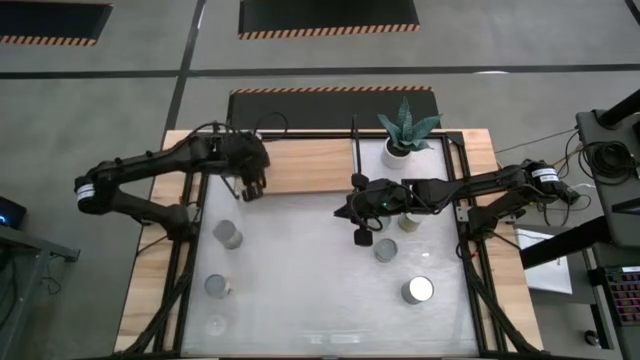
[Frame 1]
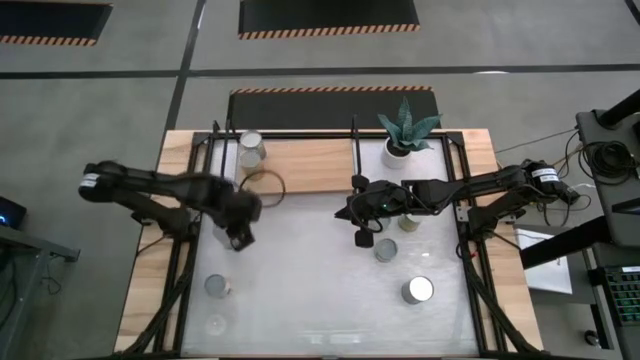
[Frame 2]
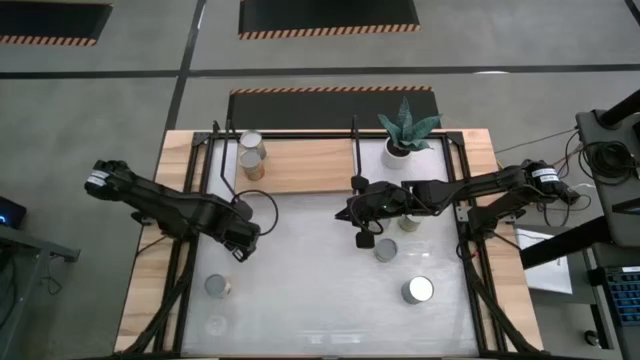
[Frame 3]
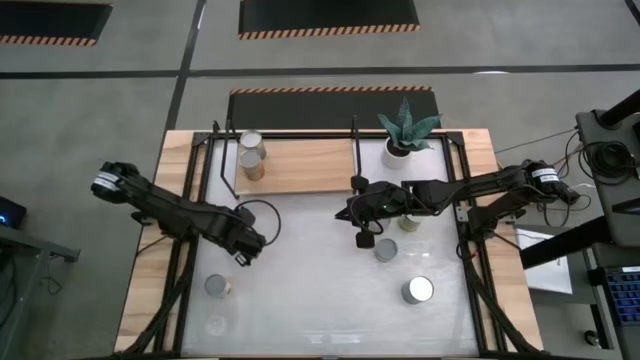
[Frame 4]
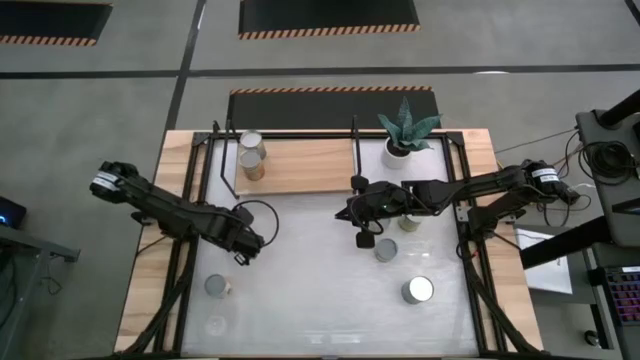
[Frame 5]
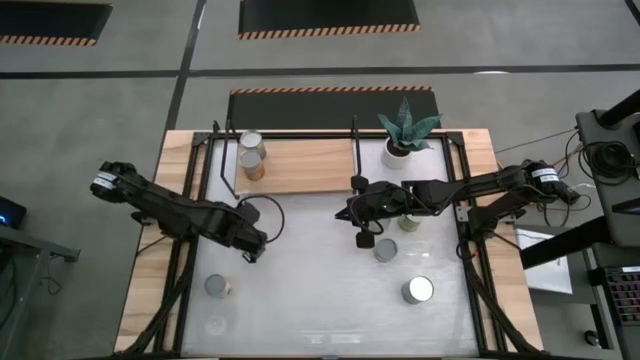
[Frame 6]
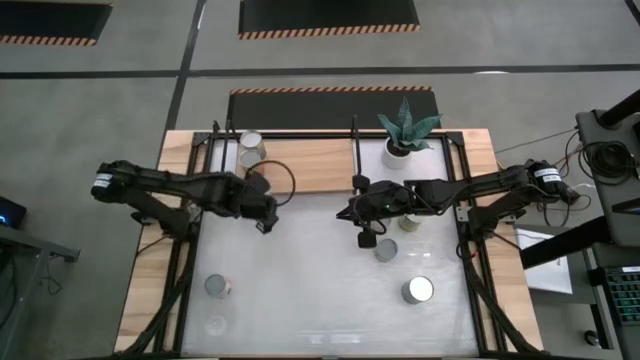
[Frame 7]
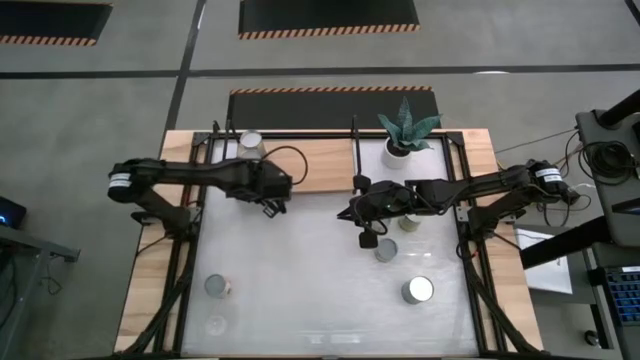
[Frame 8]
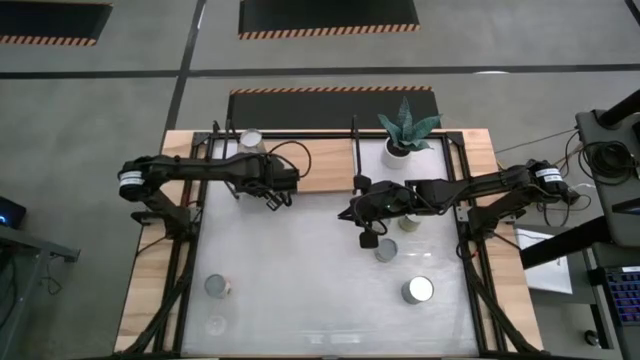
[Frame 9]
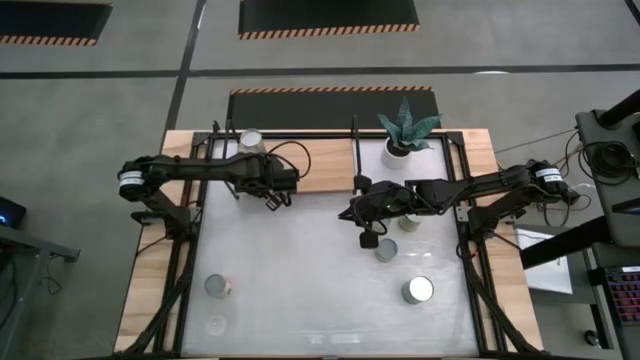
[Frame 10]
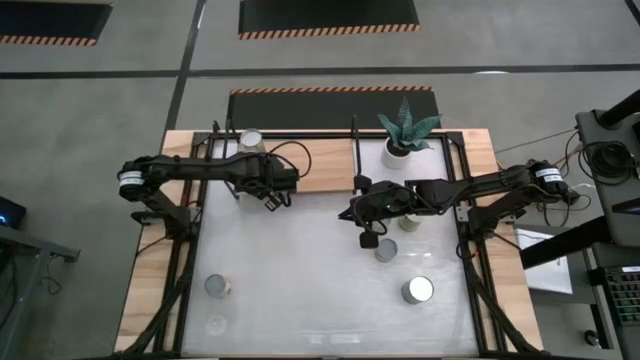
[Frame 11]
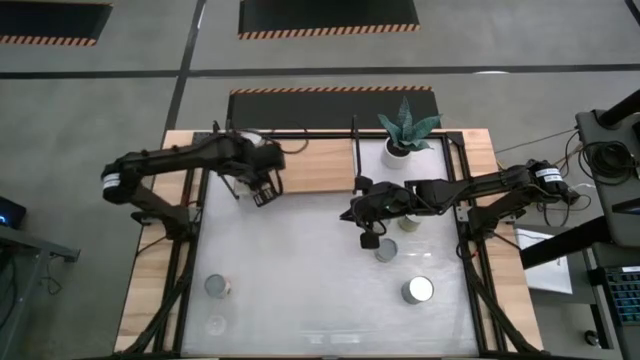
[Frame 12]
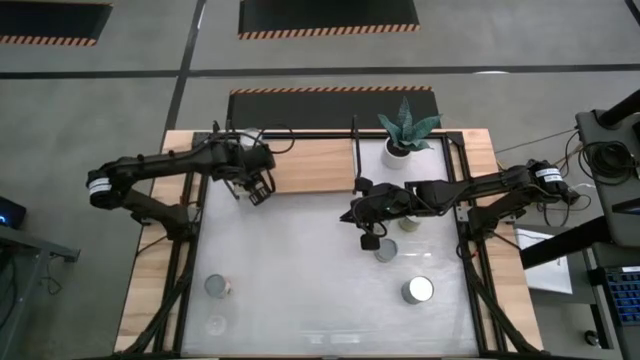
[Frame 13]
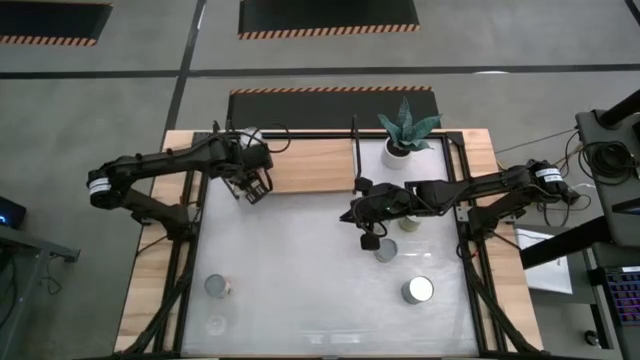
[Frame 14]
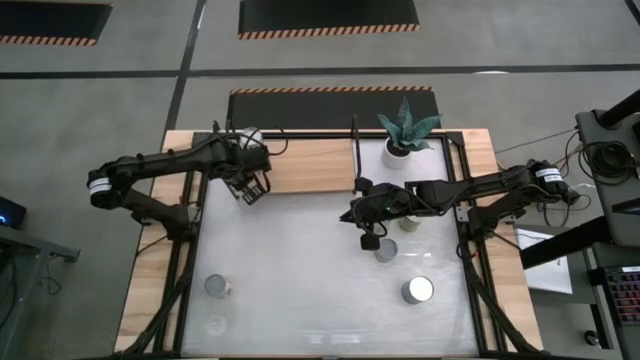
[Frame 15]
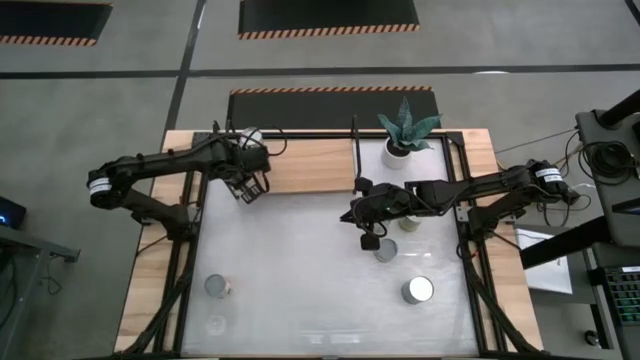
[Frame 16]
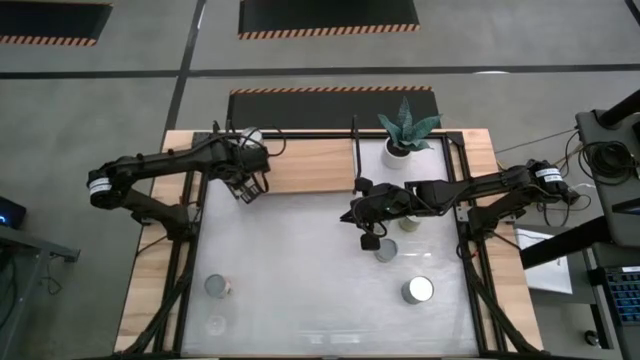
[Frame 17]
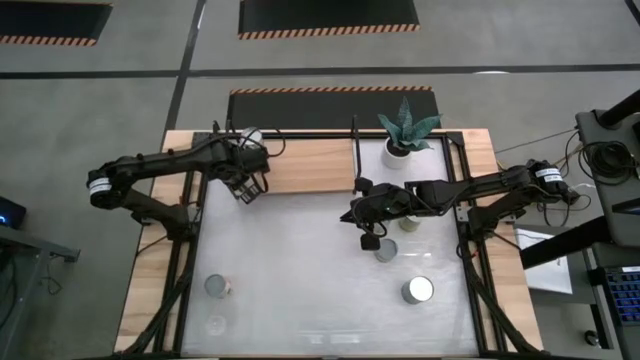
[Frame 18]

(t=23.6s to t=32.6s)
Task: Pick and place cans onto a shelf
Put the canned peas on the shelf

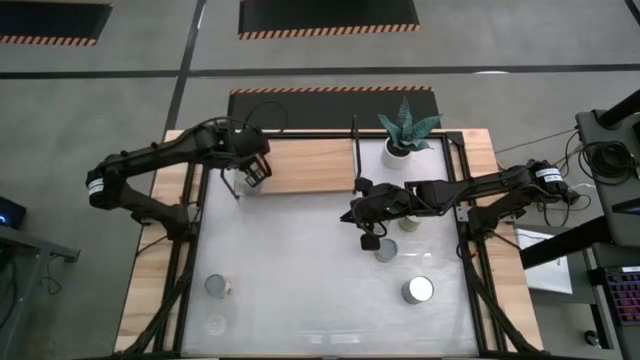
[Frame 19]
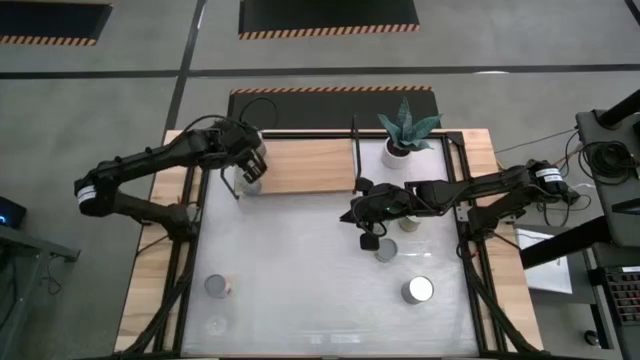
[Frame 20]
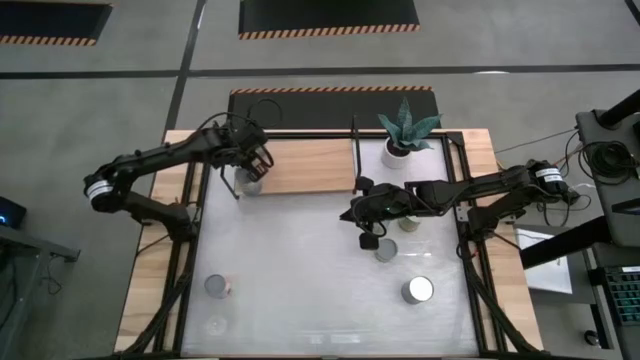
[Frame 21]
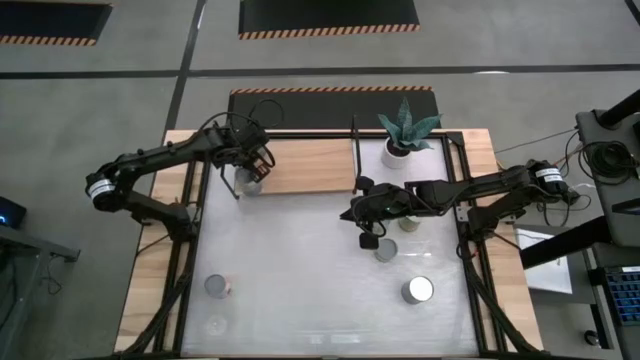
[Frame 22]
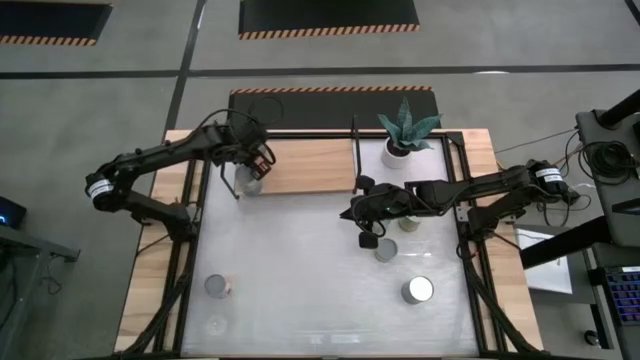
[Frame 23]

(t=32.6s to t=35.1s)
Adjust the canned pineapple on the shelf

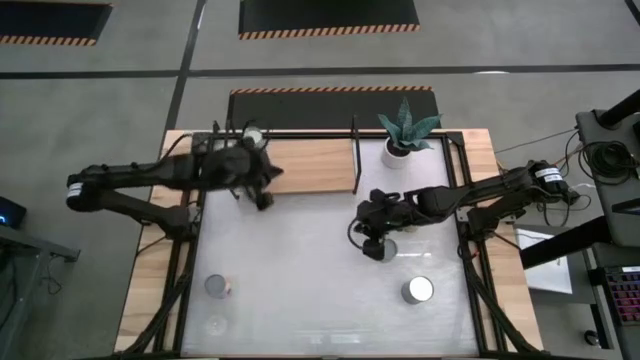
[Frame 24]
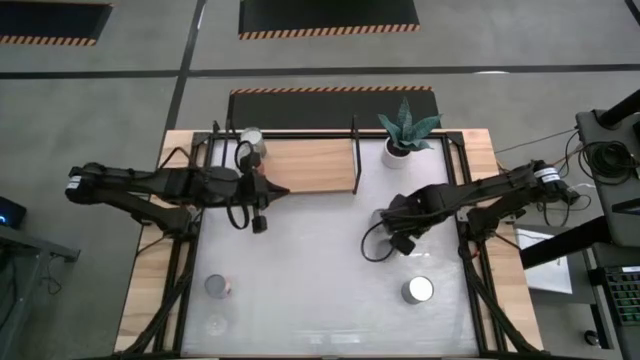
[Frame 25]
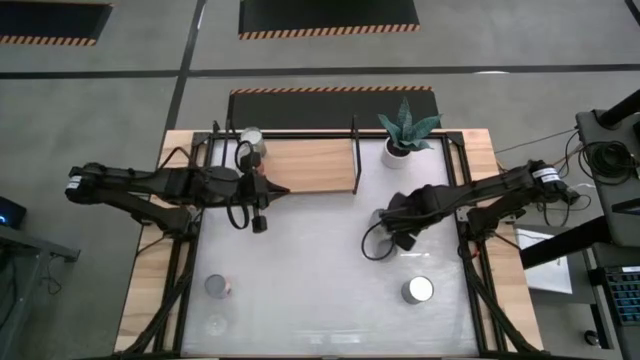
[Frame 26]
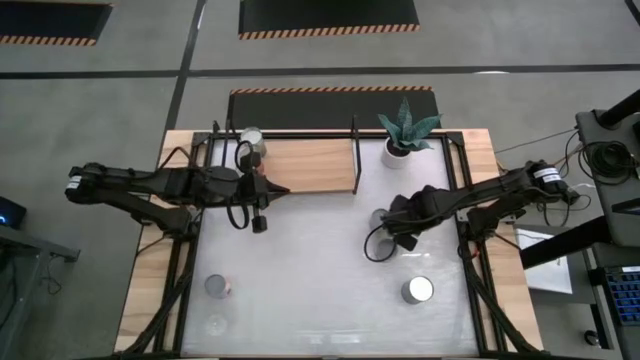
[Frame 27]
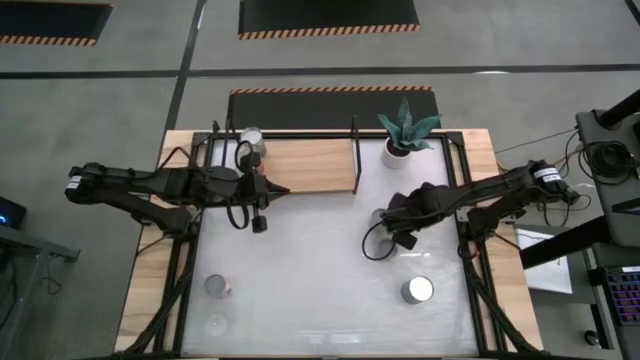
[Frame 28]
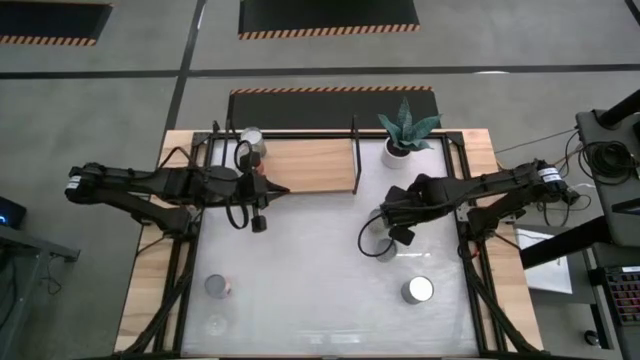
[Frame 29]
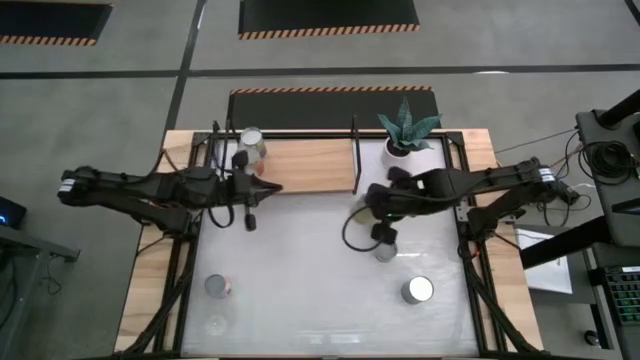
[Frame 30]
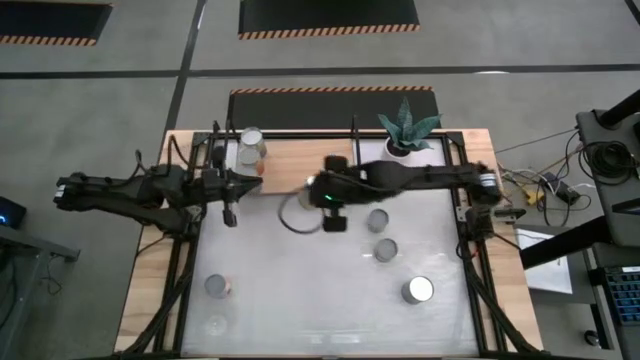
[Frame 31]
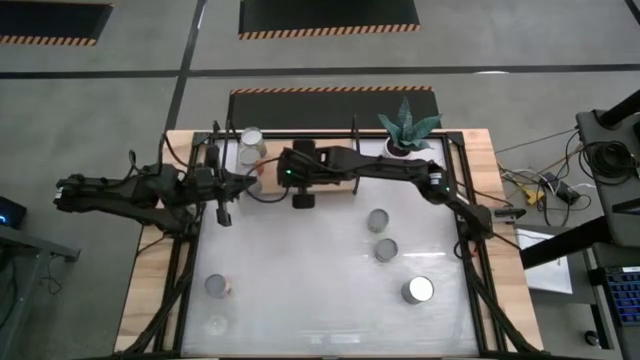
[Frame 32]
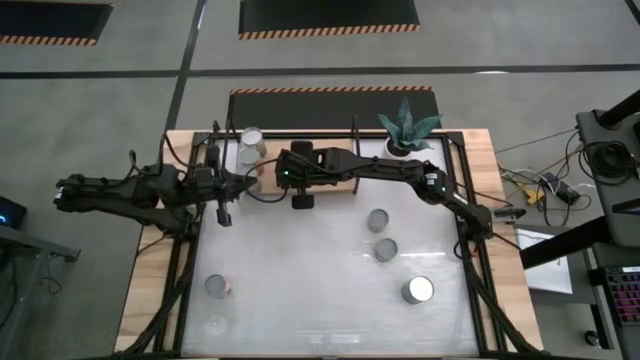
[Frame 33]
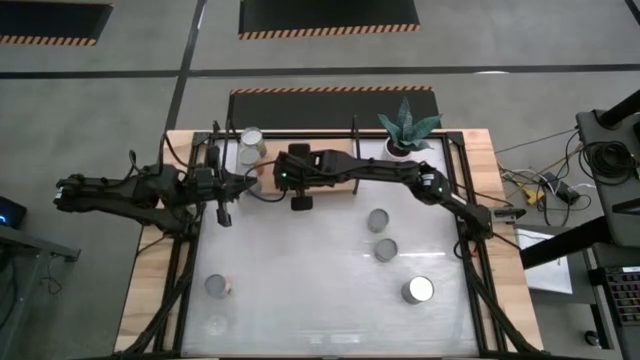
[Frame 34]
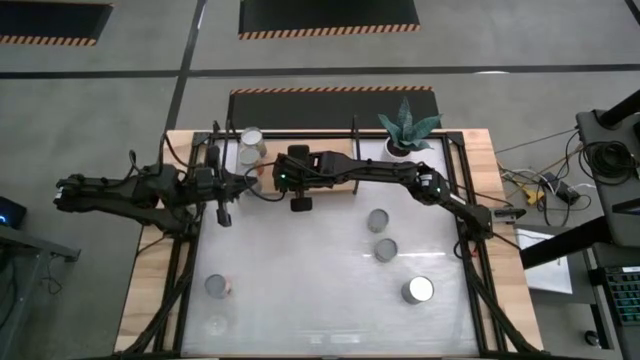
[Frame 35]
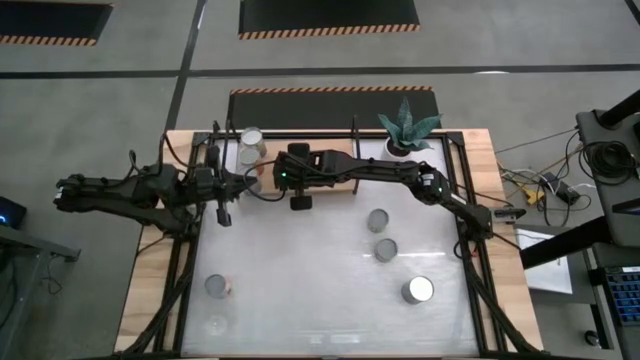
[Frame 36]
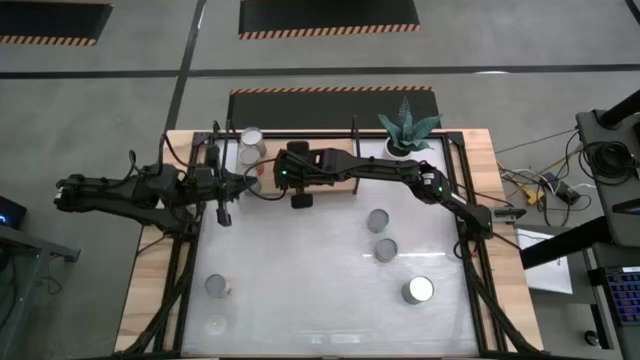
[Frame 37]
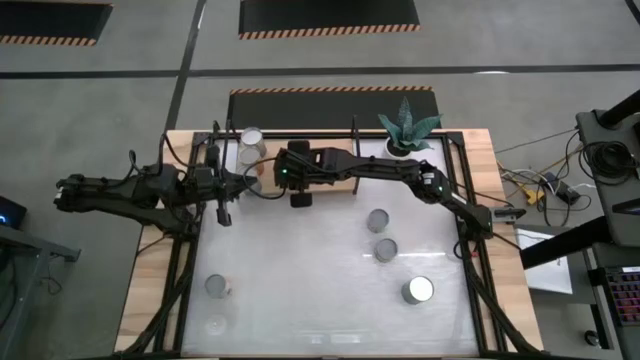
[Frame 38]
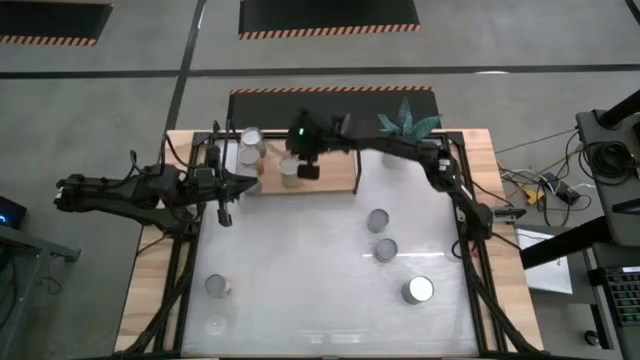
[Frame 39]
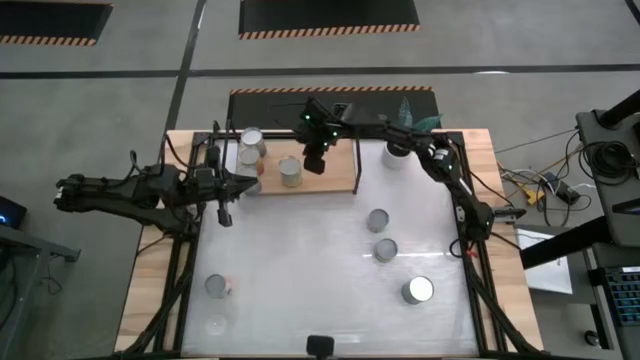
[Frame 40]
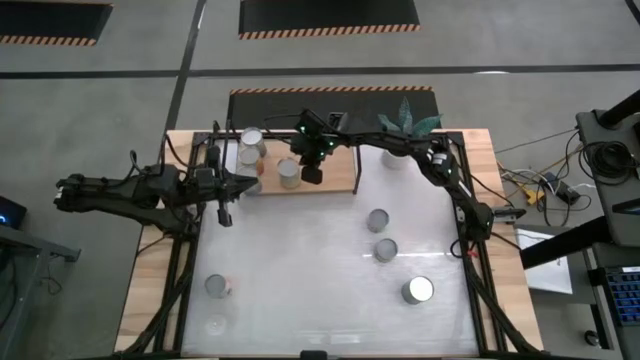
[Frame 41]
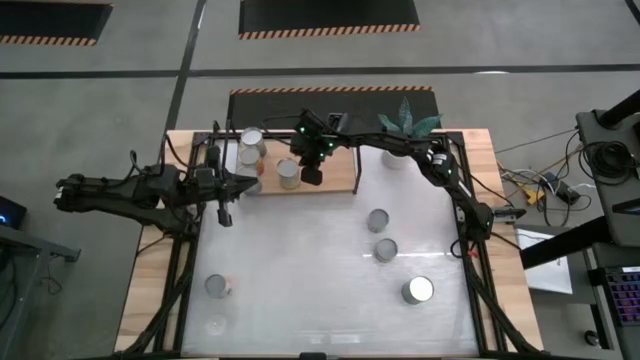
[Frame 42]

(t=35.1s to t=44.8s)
Put the canned carrots on the shelf
